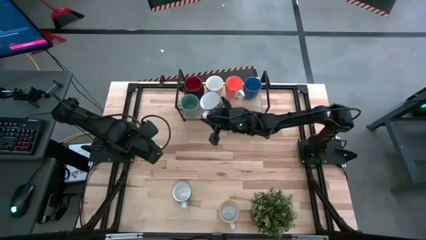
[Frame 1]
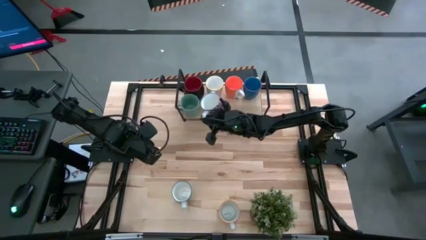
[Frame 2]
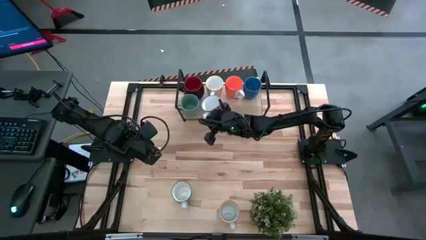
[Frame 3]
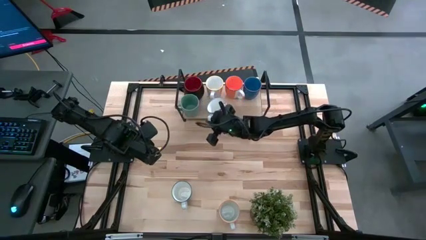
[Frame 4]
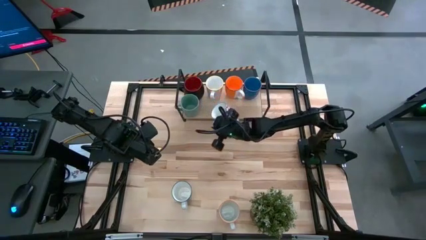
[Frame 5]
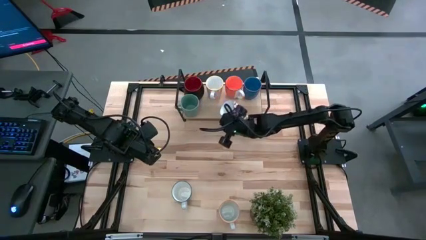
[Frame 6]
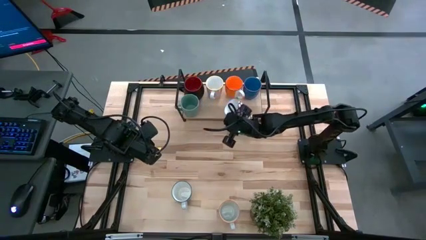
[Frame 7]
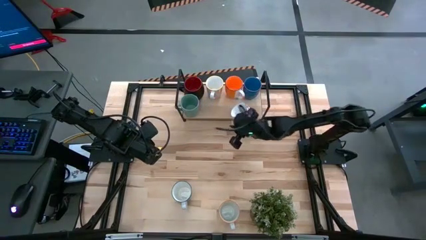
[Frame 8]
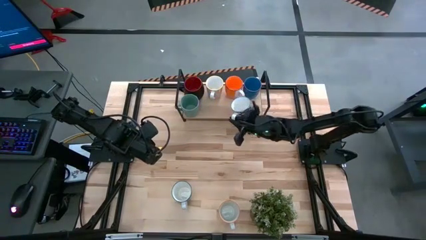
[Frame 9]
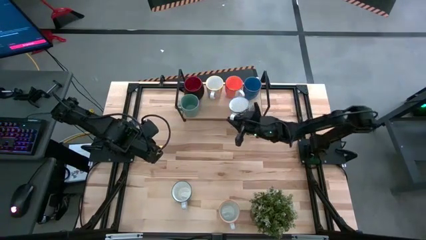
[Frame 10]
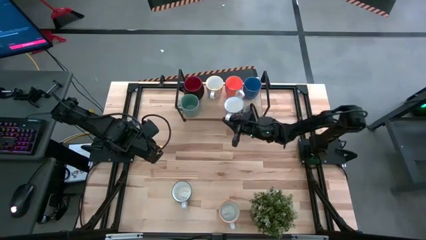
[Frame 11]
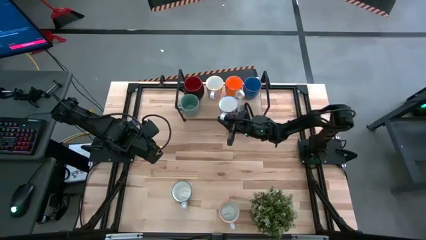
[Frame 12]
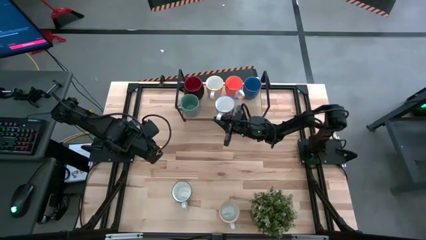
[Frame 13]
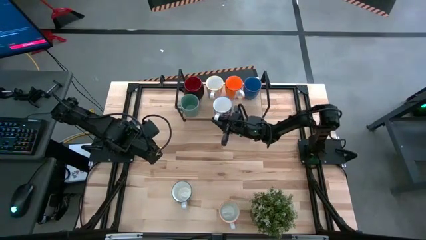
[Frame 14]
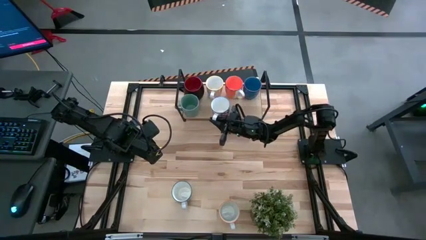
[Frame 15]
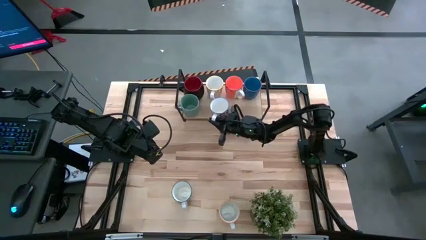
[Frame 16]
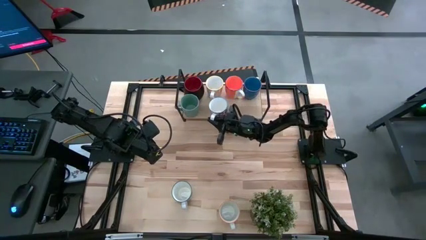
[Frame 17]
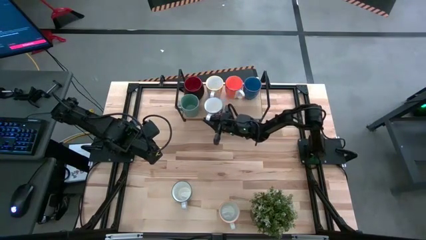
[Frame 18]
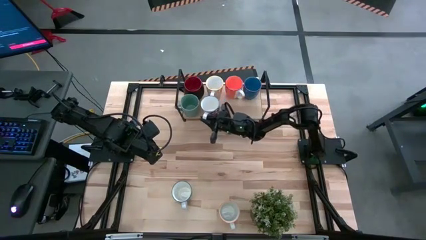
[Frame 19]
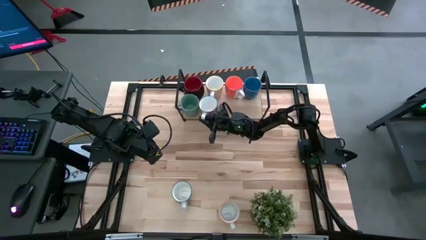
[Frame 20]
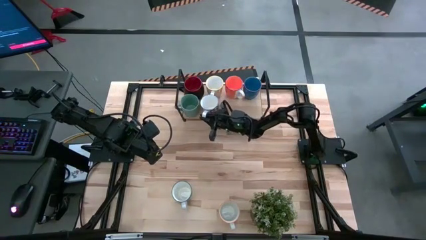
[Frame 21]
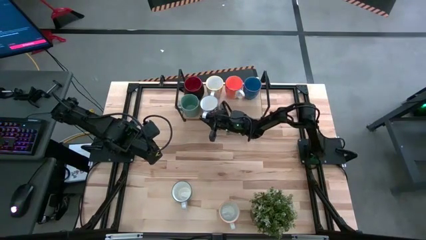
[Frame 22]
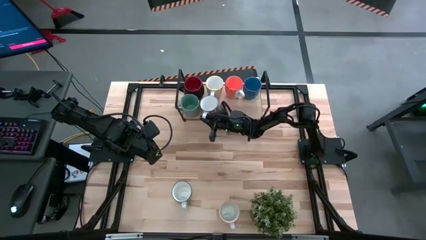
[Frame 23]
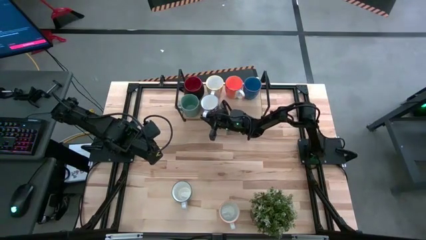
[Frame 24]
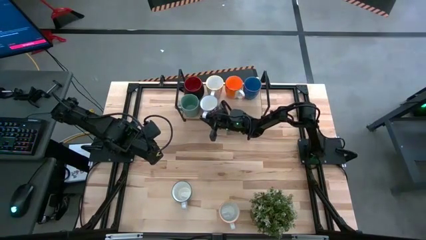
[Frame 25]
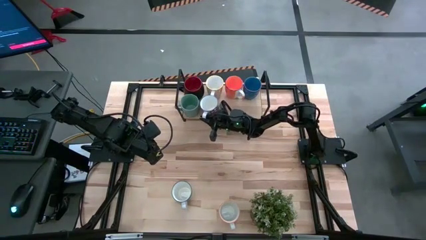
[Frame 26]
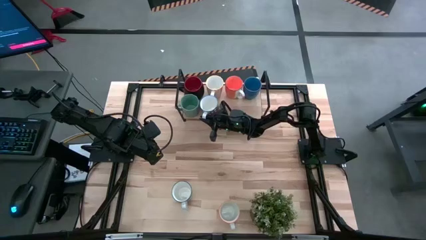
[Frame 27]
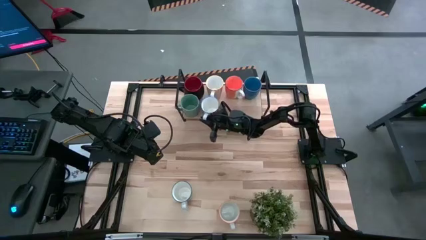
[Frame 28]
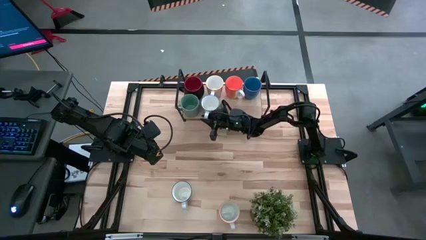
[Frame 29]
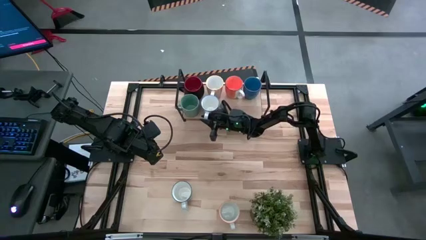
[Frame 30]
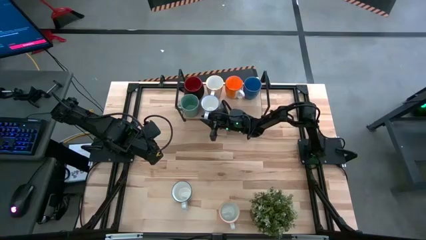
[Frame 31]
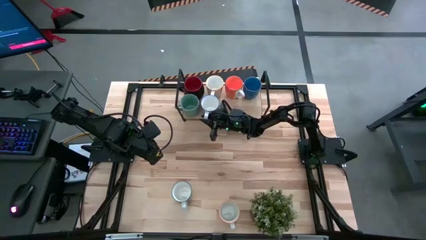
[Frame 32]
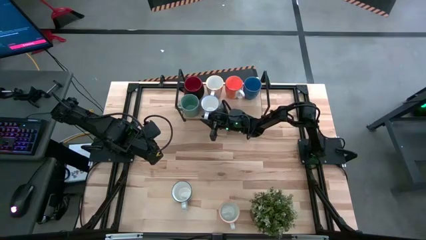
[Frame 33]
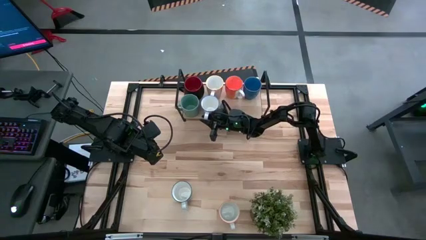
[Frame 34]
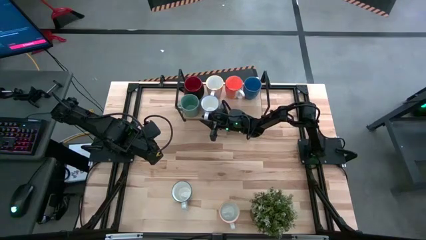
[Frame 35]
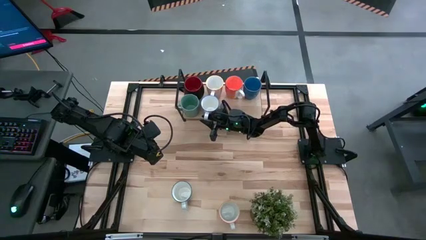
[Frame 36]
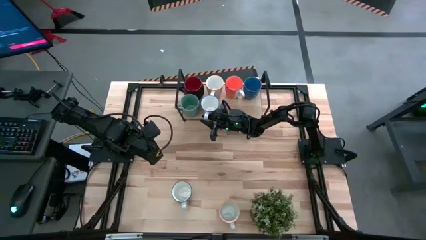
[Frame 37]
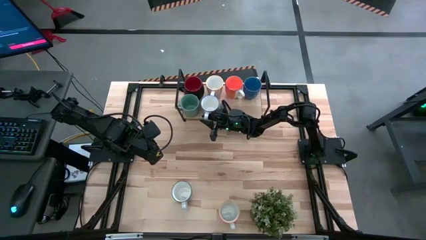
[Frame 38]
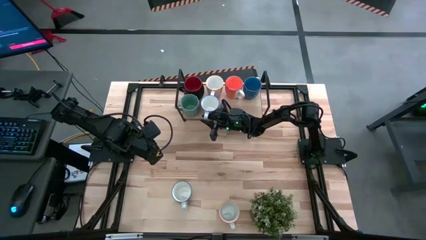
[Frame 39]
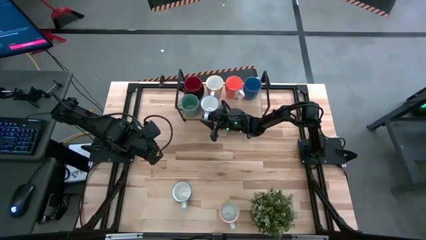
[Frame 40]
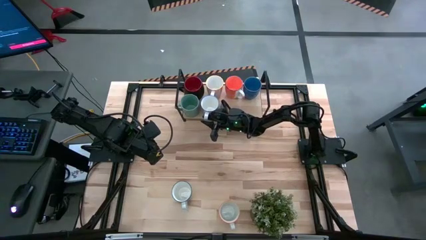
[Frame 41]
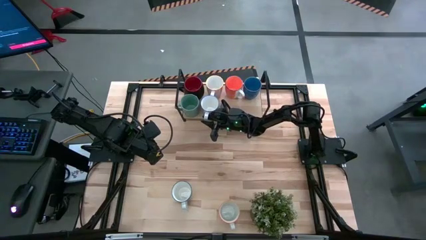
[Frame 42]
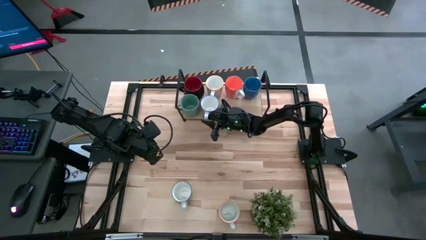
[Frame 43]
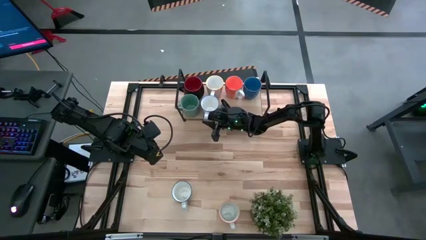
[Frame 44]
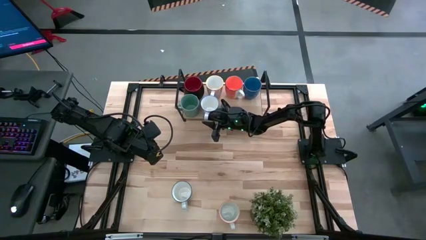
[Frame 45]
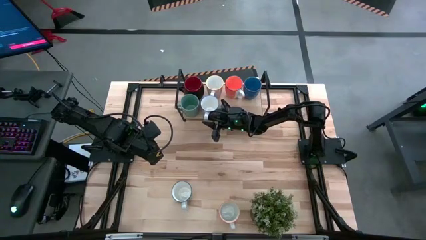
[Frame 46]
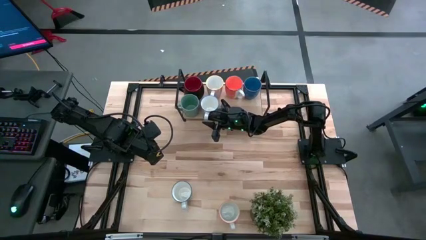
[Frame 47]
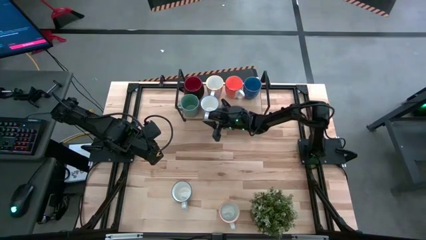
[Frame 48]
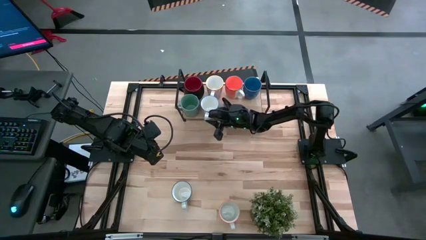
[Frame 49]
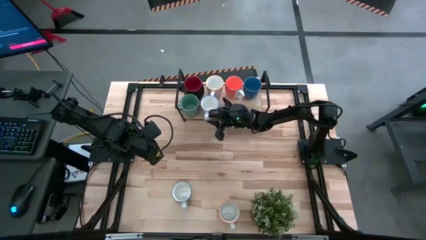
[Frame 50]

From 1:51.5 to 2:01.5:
Task: Place coffee mugs
Put the red pattern mug on the shelf

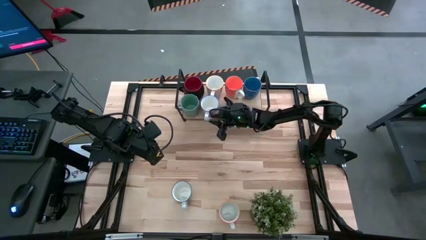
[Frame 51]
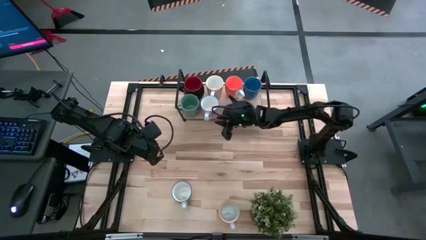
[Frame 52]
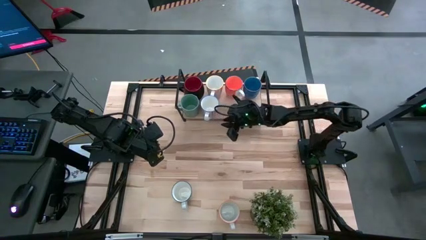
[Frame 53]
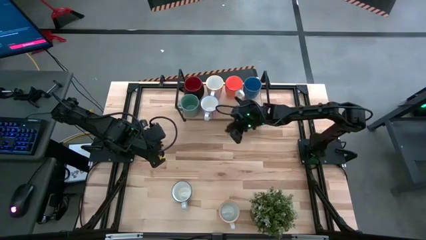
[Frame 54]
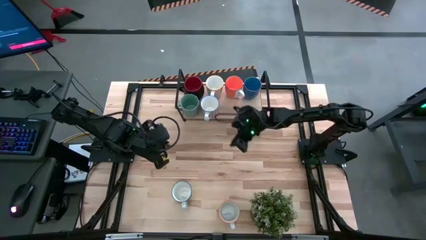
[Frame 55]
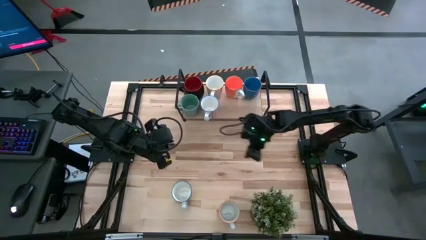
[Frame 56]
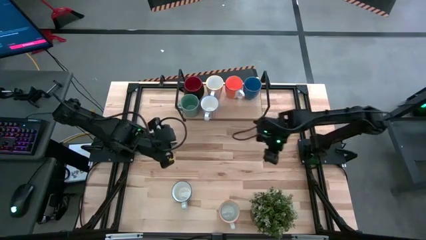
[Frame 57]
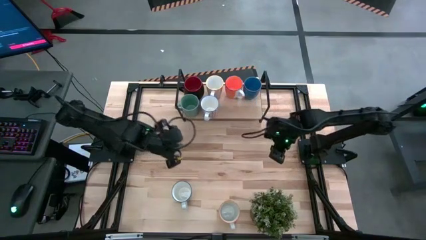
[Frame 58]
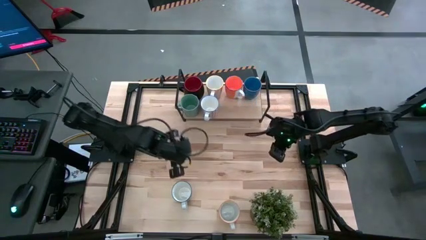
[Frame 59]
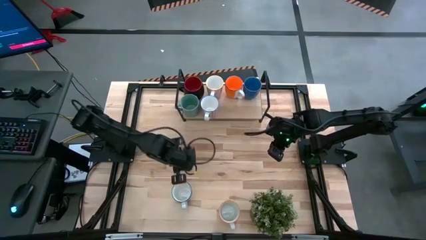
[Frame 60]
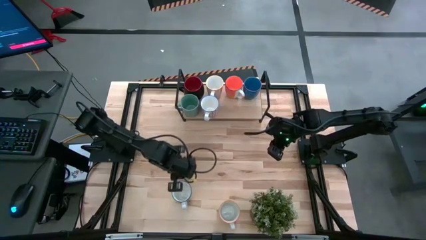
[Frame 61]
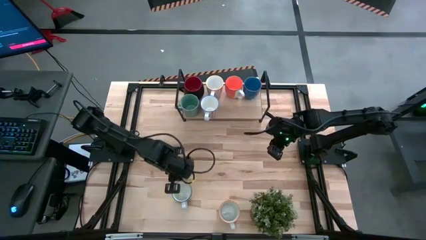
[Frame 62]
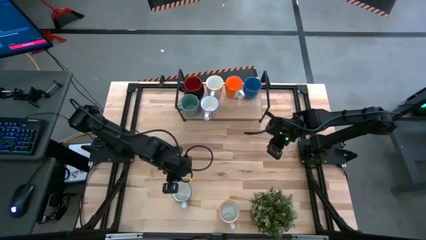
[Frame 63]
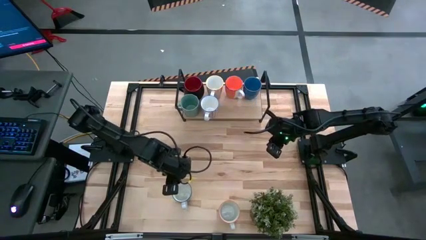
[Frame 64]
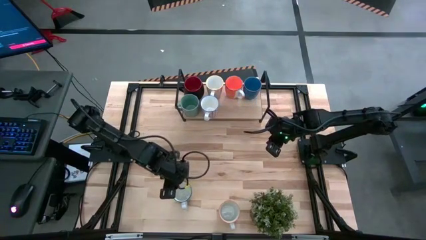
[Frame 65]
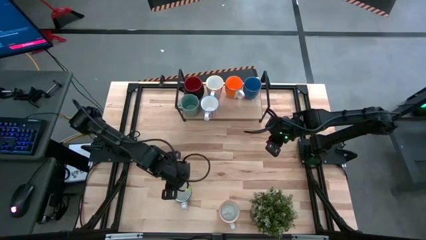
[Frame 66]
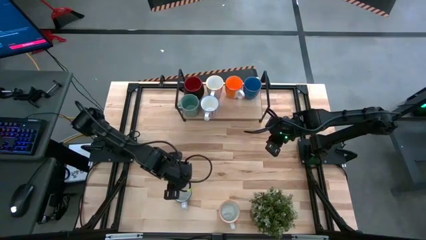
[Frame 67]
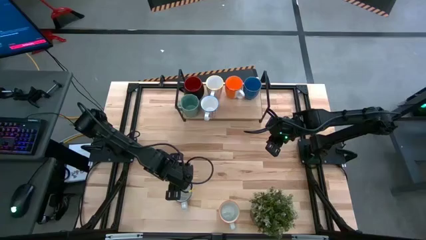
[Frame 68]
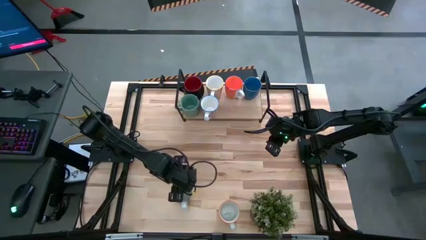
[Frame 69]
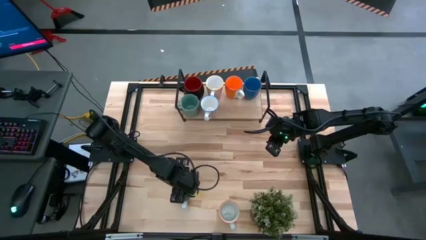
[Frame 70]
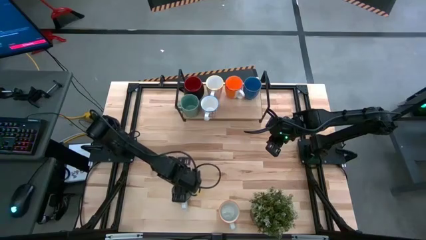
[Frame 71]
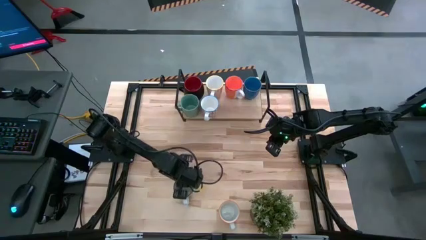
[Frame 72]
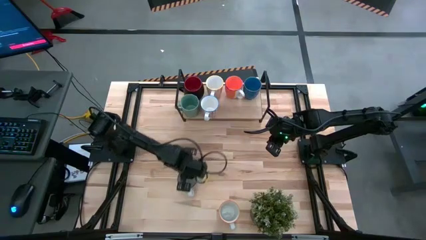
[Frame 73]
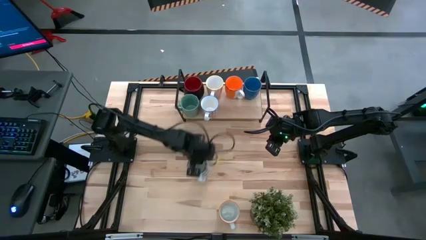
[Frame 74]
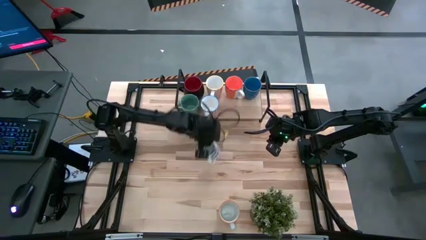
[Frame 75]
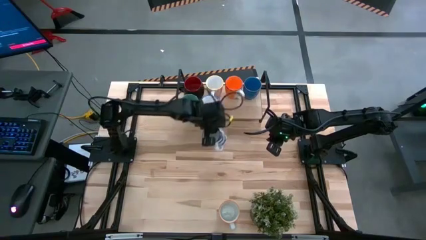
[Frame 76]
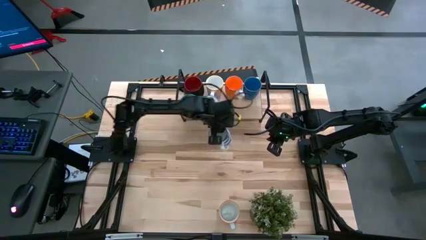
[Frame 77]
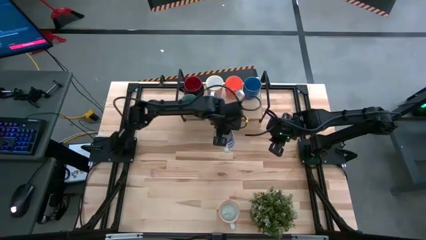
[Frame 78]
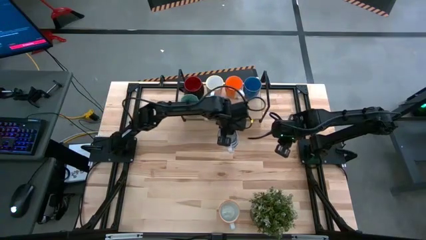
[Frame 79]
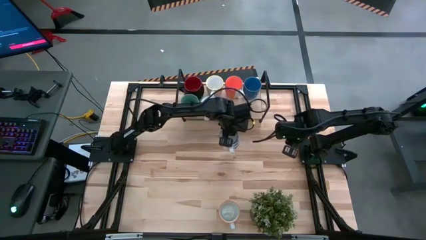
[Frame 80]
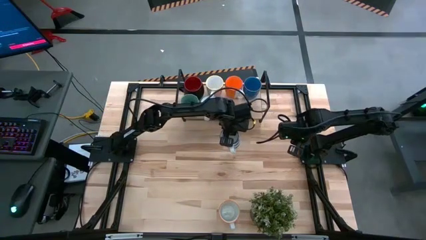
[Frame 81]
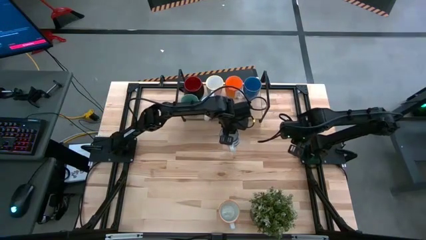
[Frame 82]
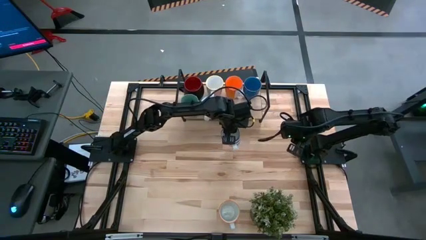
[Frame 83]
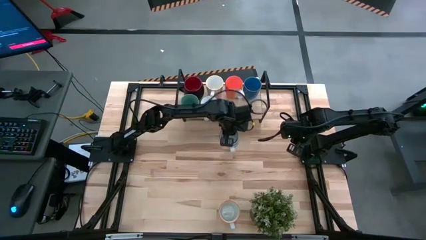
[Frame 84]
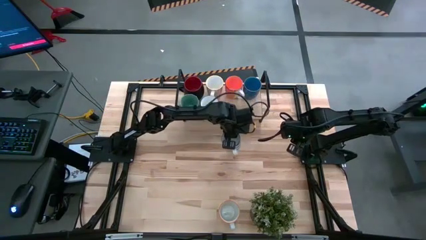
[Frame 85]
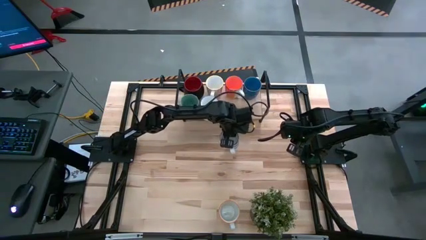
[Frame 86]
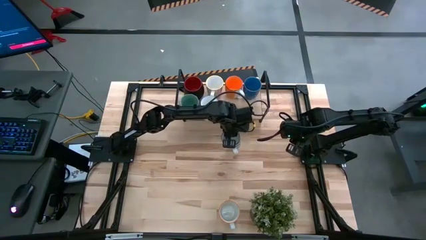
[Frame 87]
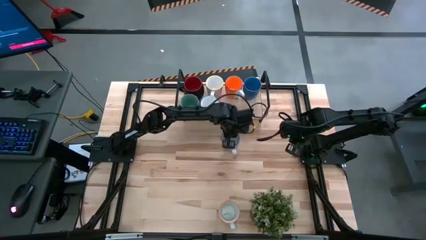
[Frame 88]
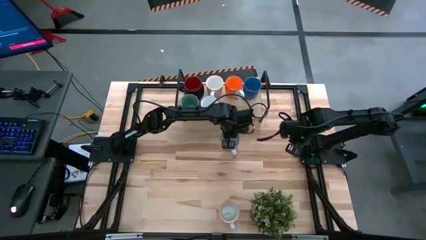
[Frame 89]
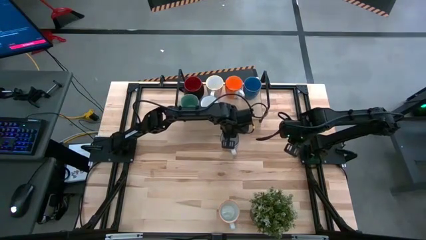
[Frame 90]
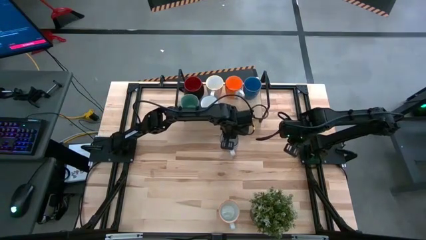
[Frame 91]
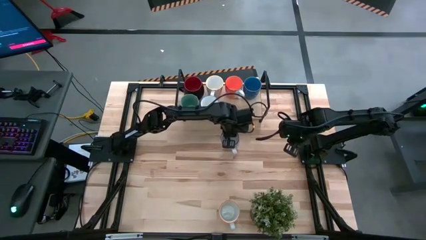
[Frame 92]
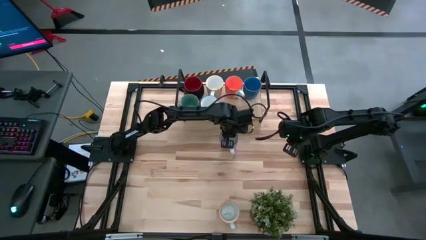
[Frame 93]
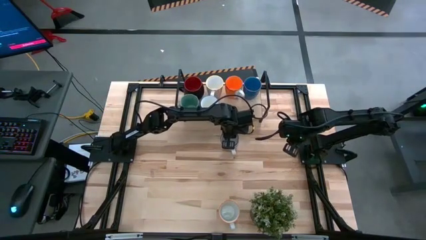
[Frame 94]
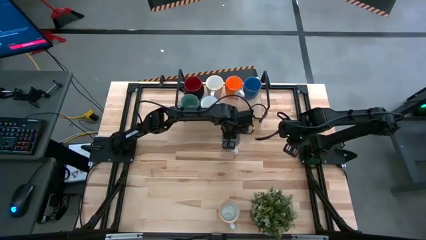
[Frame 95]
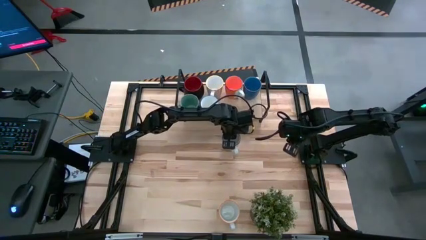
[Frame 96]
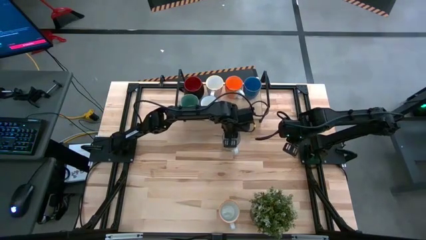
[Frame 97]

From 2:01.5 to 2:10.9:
Move the blue pattern mug to the center table
